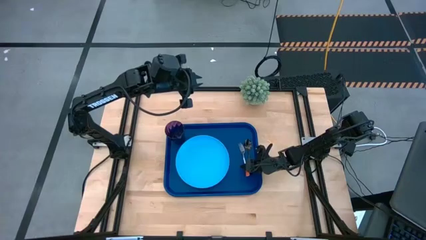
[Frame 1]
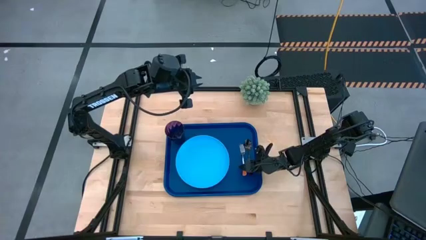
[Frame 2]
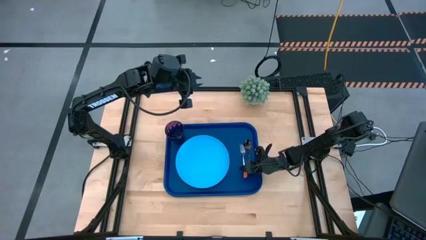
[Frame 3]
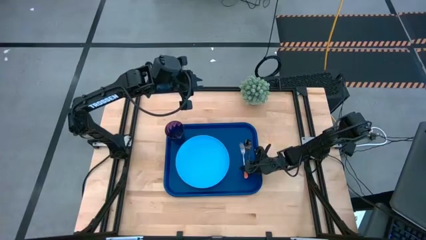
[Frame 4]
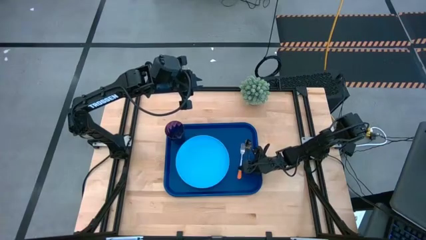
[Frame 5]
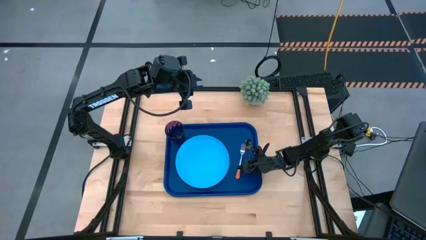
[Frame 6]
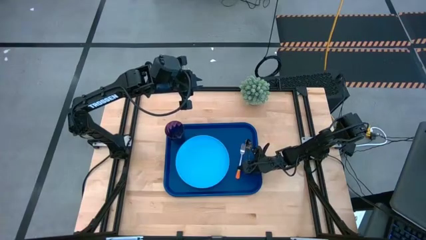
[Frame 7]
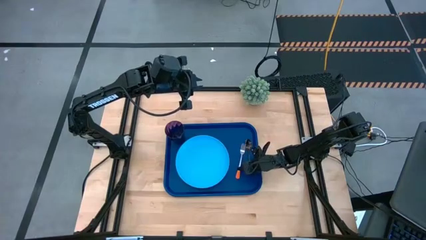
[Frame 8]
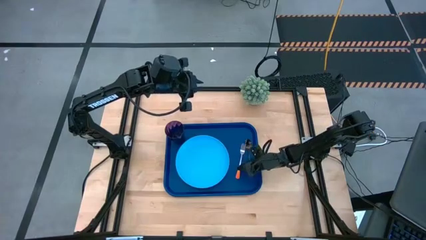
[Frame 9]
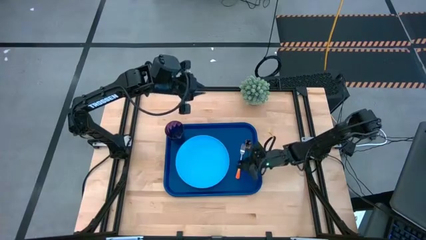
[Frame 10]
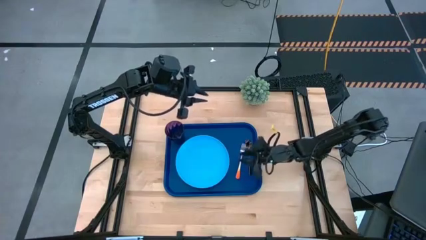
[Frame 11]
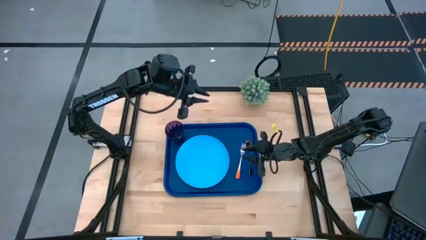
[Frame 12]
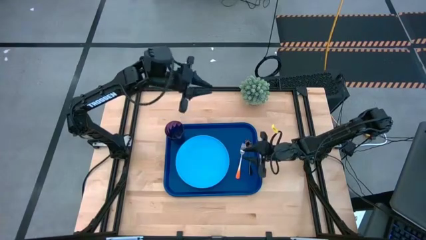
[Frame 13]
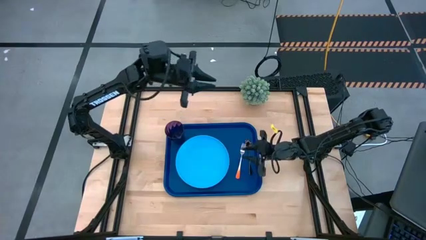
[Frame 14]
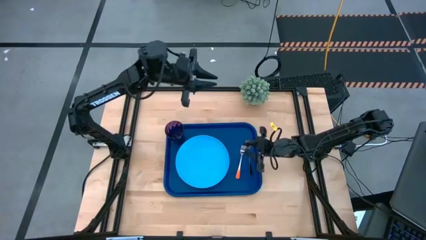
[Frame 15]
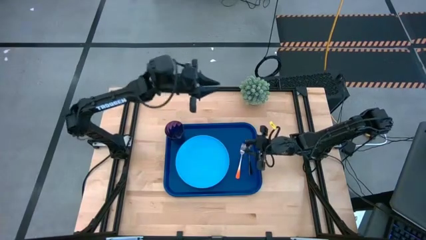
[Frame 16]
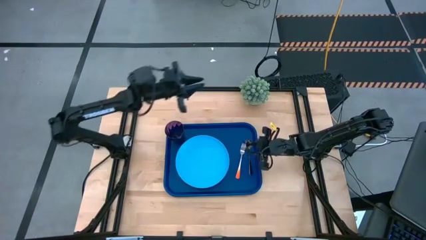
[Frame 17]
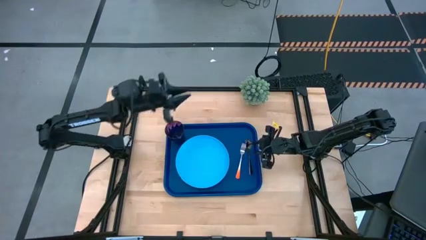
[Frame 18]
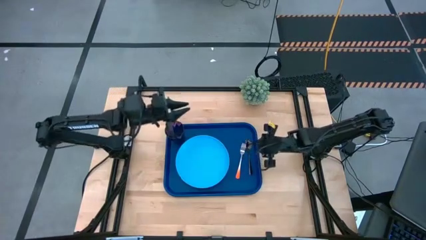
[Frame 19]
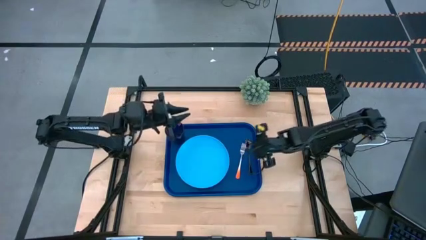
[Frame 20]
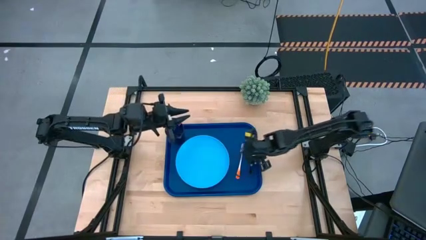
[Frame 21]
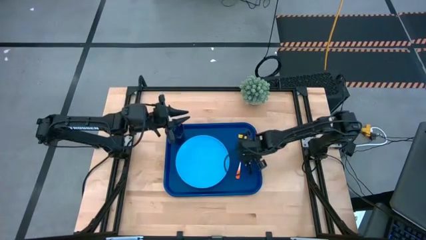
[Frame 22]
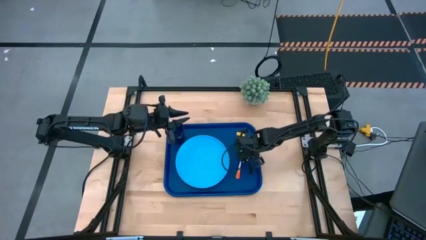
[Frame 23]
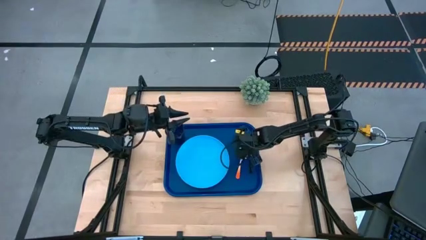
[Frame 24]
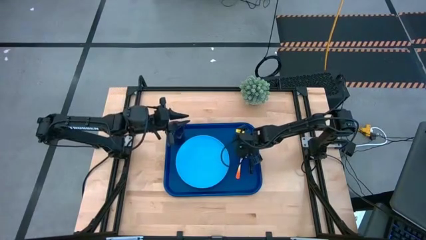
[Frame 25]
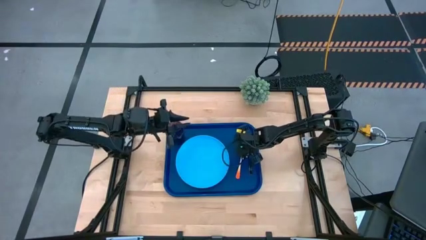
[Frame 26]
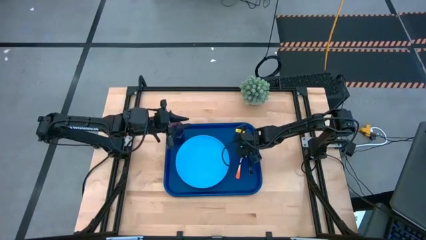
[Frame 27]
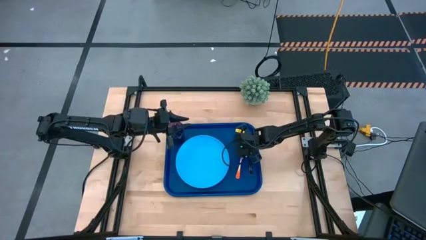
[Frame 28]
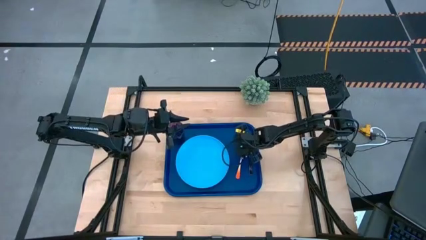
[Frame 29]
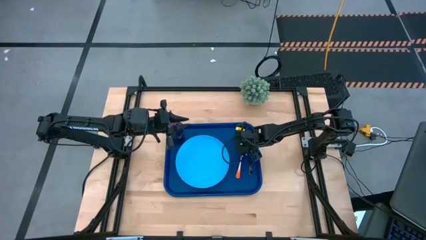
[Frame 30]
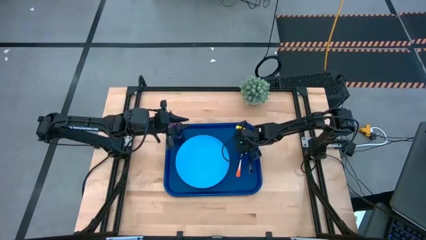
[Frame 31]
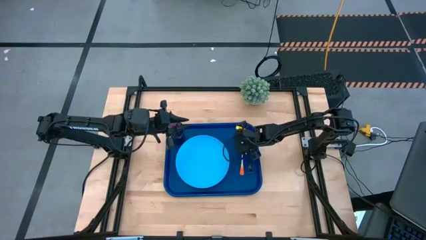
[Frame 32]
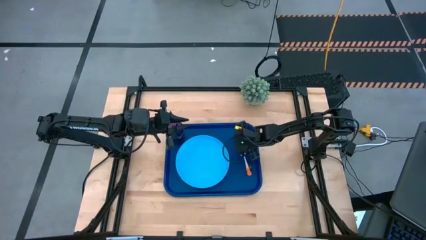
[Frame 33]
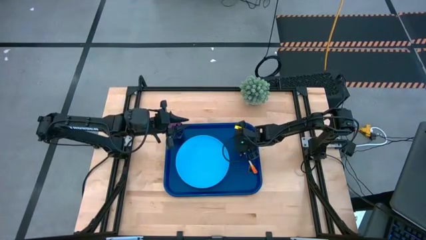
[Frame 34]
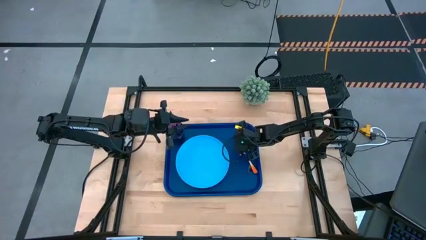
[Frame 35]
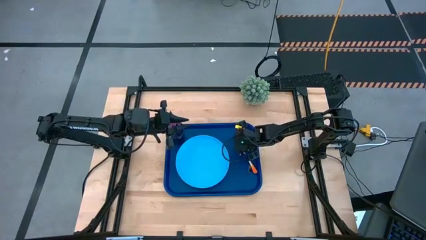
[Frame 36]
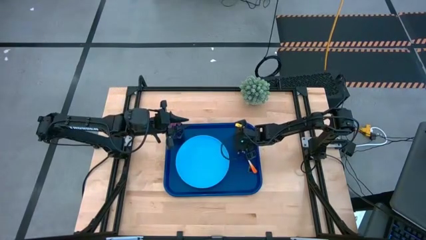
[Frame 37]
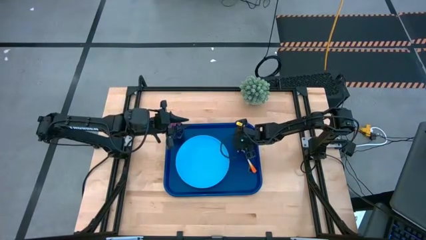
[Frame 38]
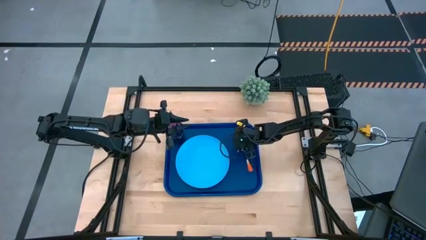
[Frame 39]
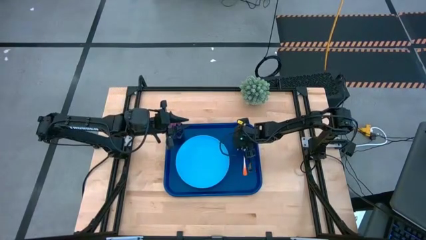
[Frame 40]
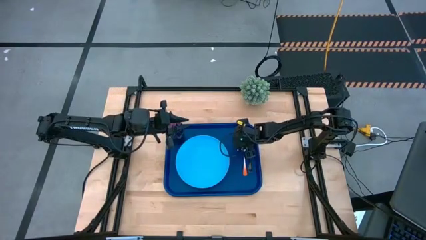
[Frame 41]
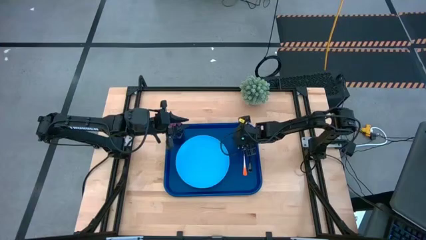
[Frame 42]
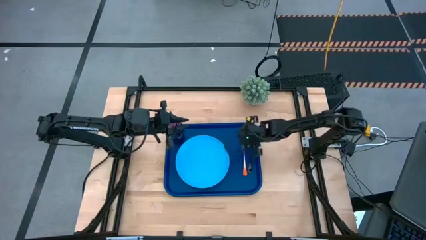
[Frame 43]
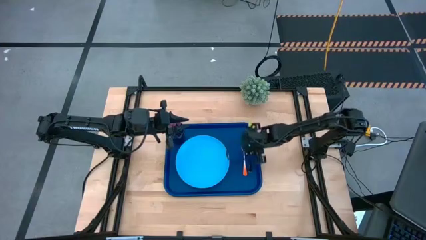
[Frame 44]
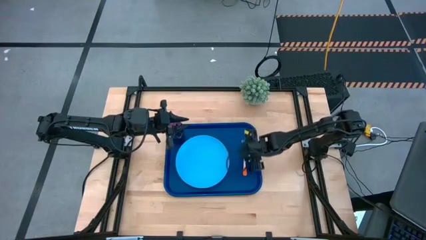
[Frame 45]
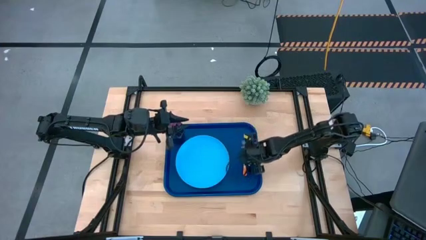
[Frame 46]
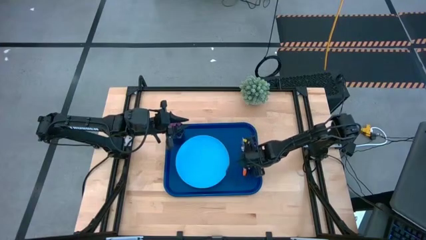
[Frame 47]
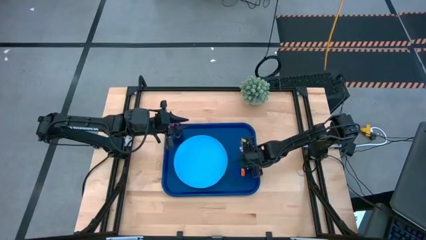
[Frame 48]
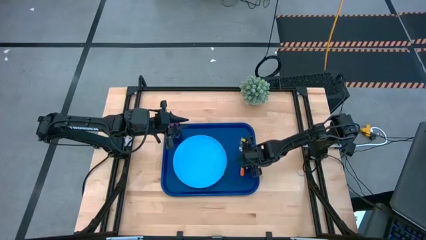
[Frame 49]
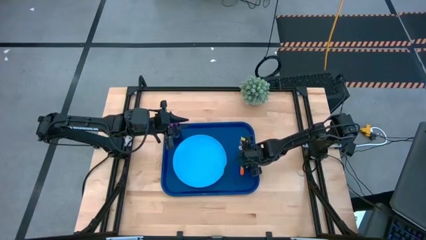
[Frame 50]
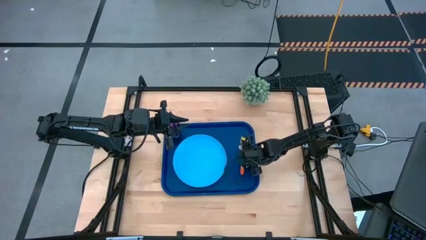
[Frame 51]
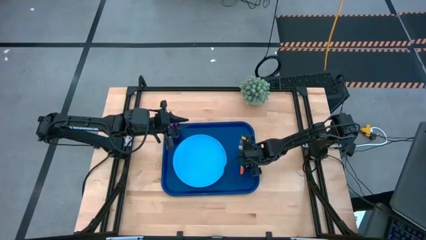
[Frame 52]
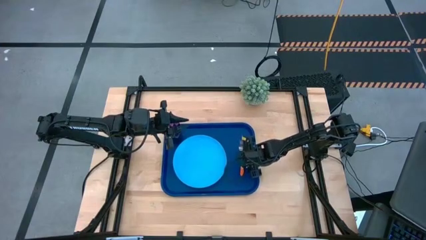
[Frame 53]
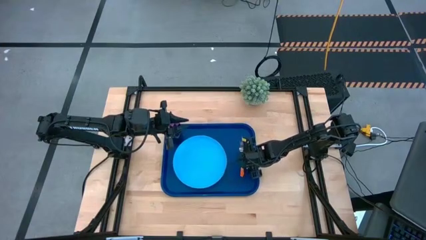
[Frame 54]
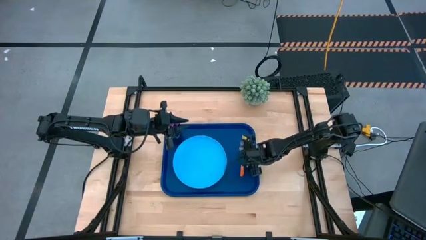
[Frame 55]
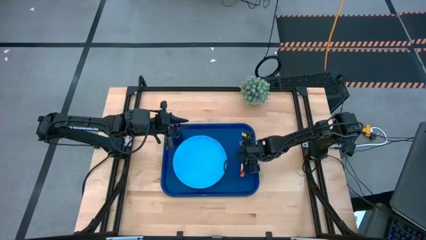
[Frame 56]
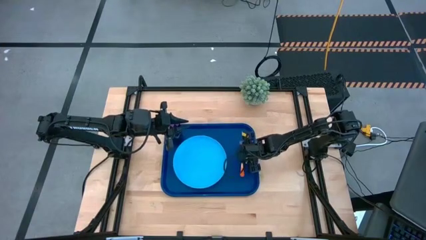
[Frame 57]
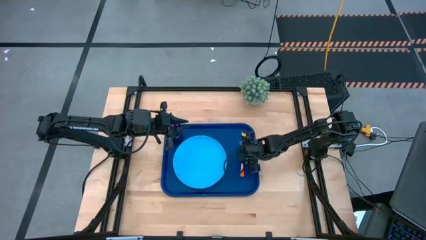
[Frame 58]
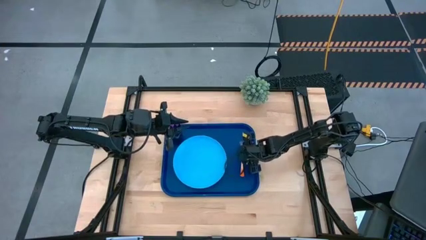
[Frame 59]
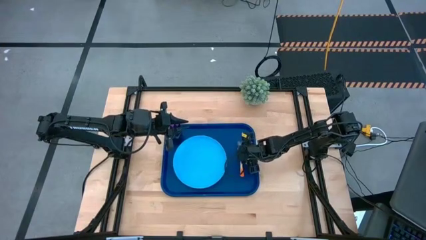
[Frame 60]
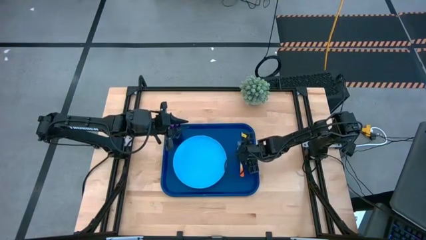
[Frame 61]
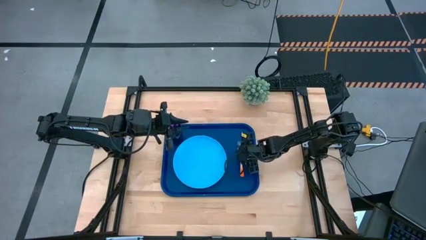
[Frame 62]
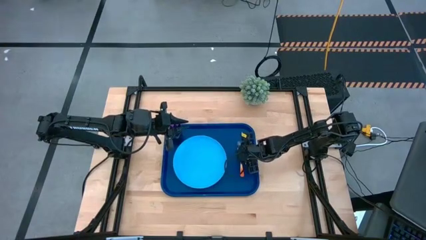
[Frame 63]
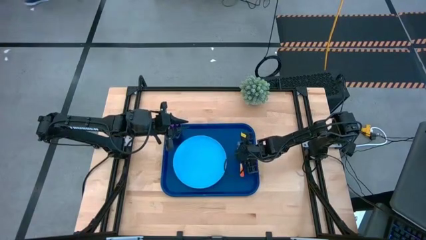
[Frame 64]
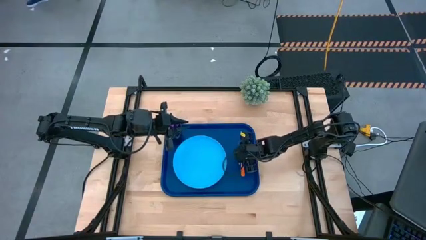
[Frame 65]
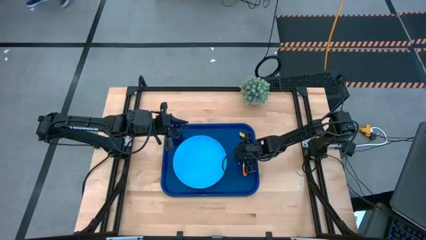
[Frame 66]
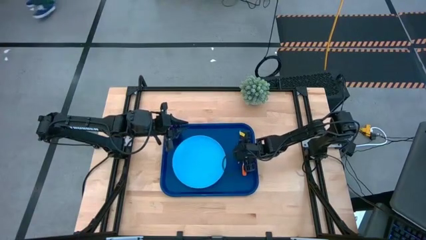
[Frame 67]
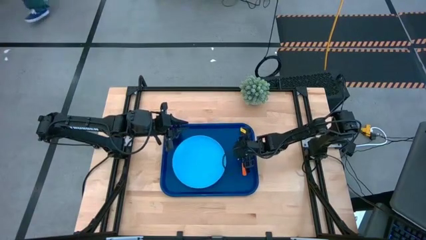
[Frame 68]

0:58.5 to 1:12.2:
Task: Pick and place plate/cup/fork/spoon on tray
Put the orange fork in the middle of the light blue plate and black spoon on the dark blue tray
